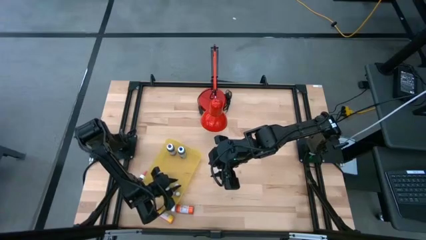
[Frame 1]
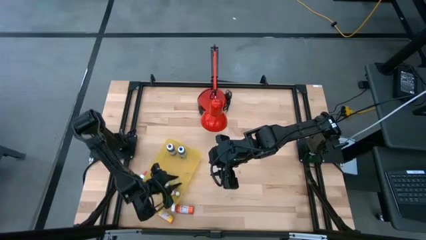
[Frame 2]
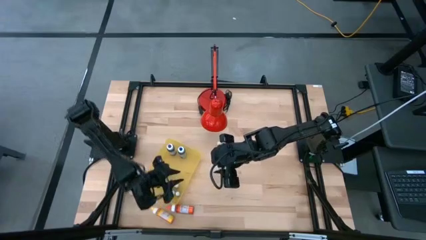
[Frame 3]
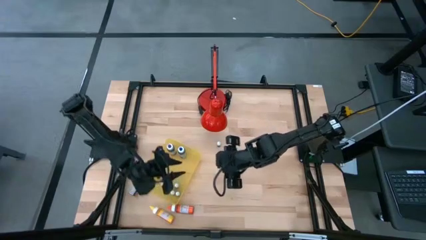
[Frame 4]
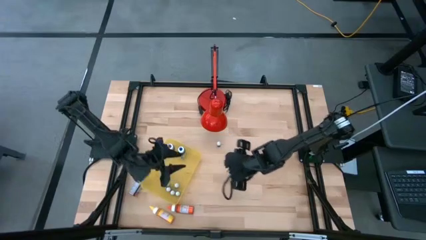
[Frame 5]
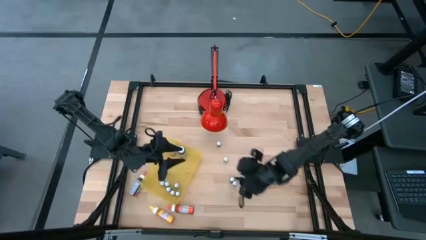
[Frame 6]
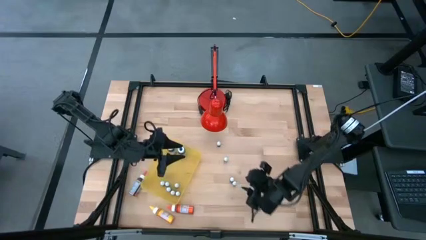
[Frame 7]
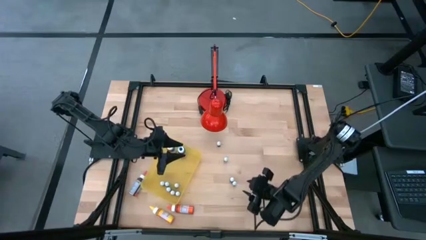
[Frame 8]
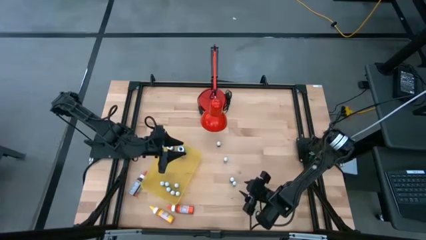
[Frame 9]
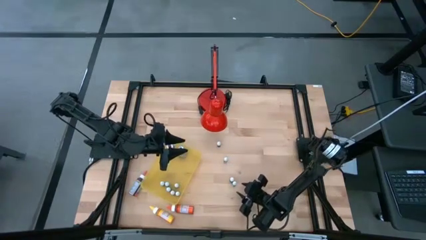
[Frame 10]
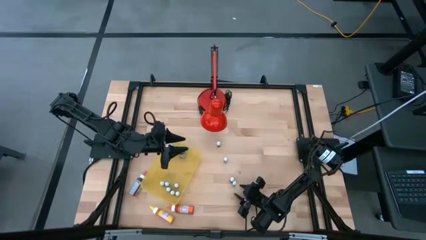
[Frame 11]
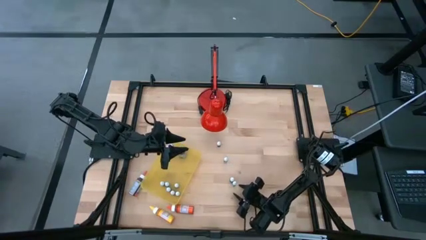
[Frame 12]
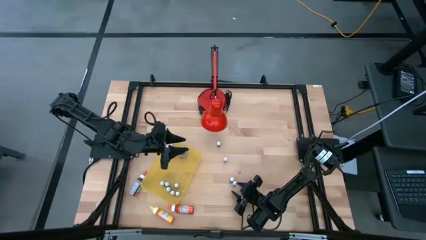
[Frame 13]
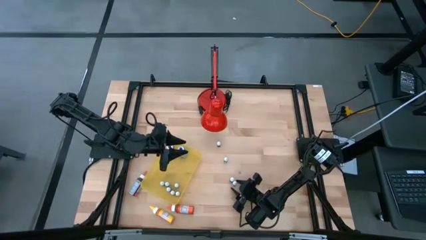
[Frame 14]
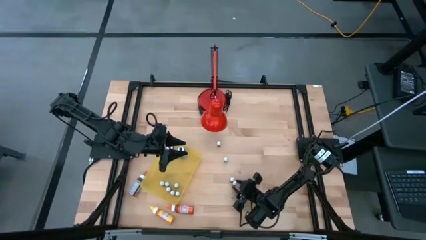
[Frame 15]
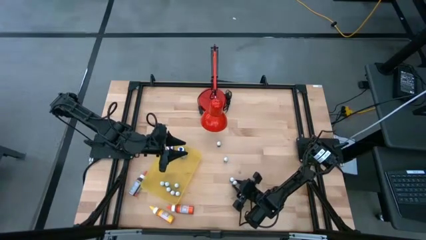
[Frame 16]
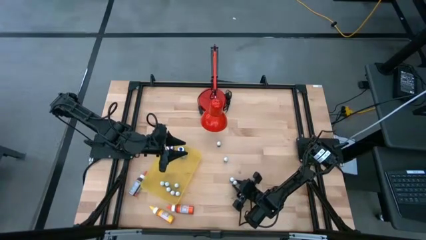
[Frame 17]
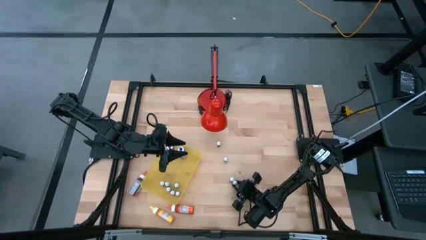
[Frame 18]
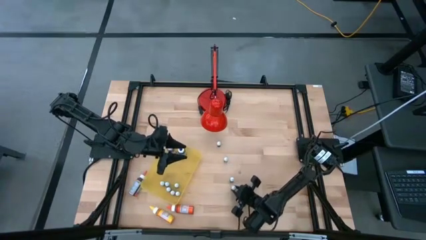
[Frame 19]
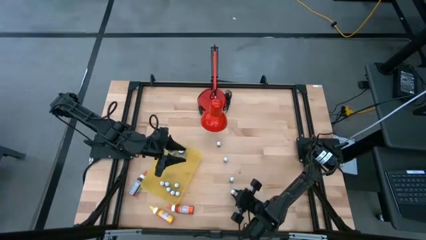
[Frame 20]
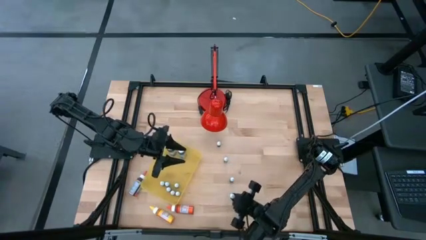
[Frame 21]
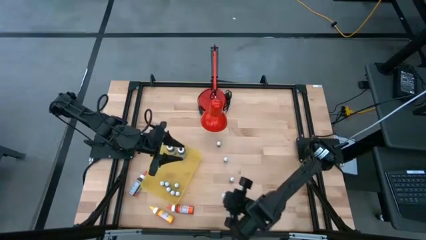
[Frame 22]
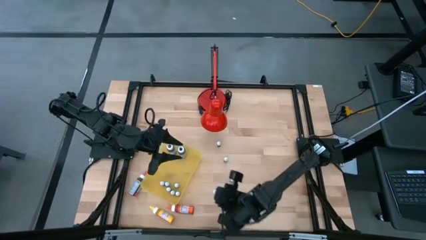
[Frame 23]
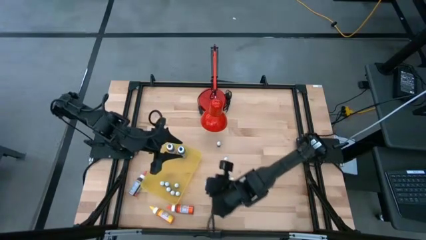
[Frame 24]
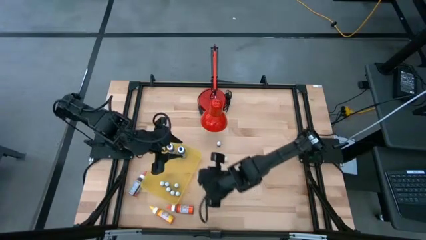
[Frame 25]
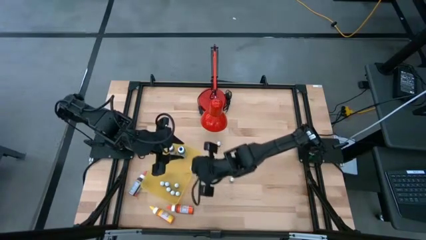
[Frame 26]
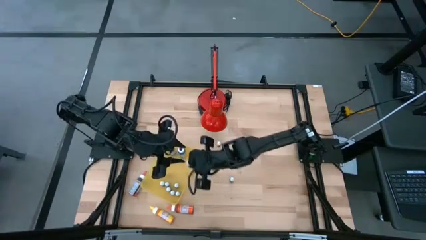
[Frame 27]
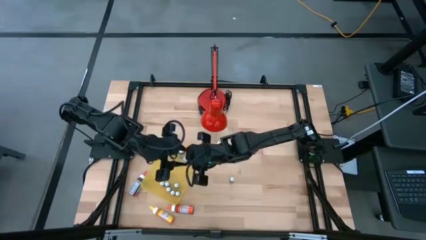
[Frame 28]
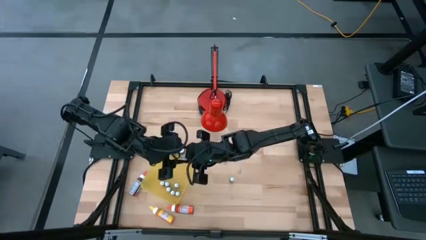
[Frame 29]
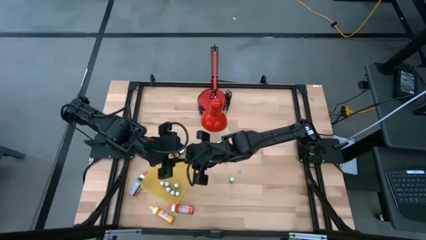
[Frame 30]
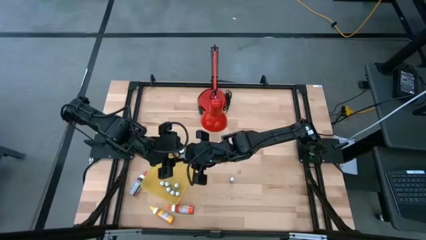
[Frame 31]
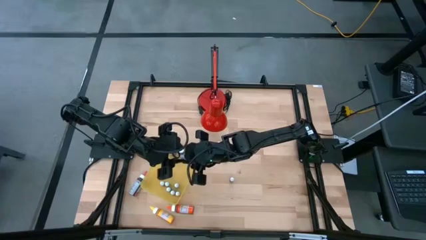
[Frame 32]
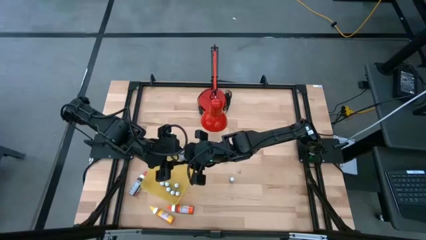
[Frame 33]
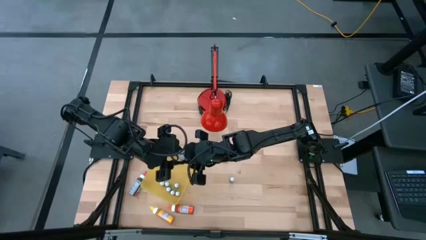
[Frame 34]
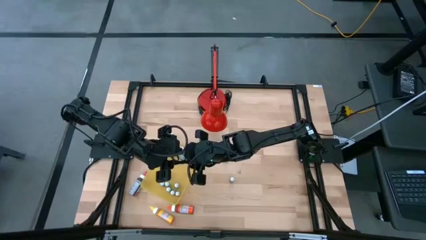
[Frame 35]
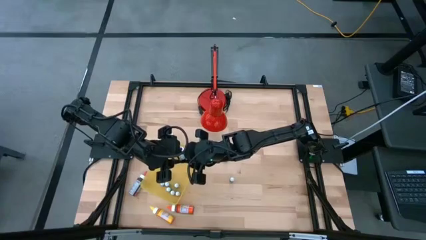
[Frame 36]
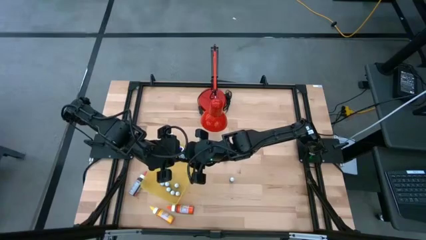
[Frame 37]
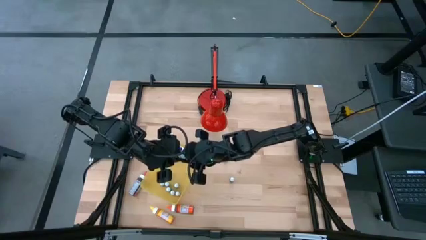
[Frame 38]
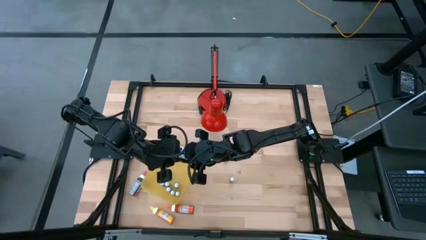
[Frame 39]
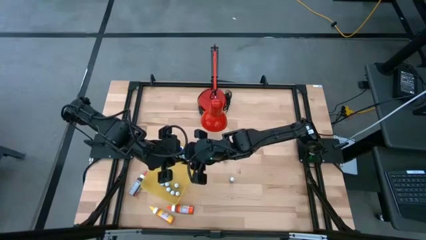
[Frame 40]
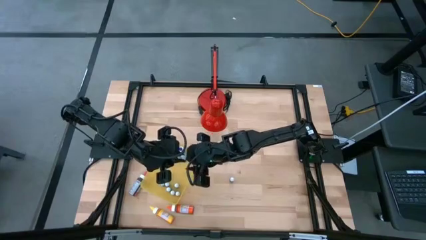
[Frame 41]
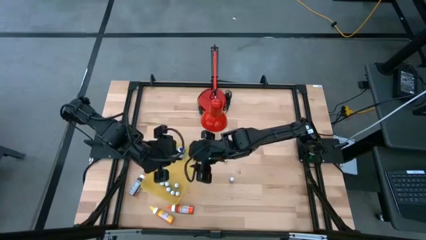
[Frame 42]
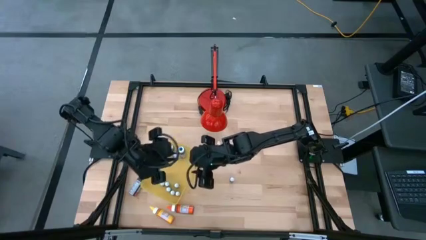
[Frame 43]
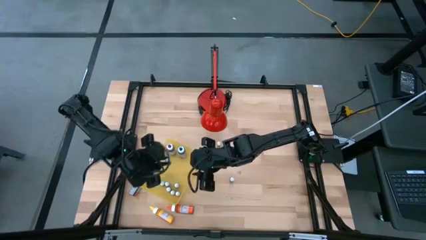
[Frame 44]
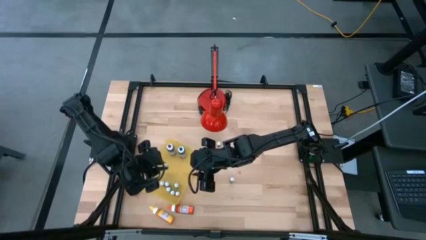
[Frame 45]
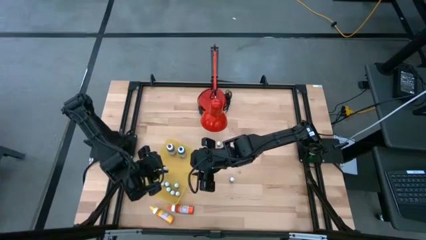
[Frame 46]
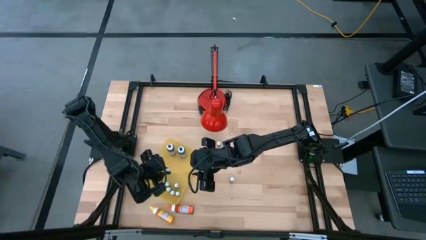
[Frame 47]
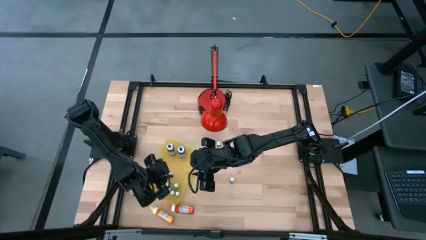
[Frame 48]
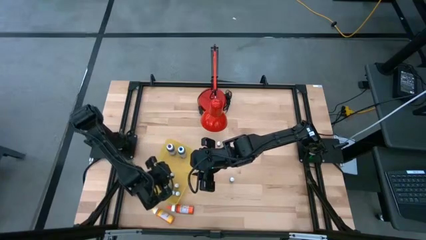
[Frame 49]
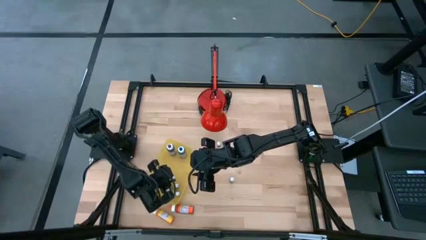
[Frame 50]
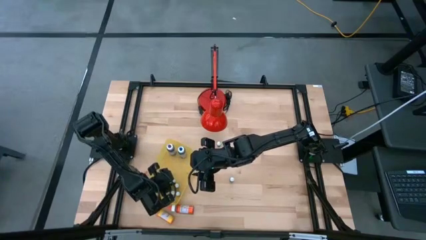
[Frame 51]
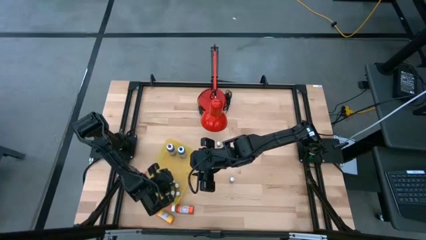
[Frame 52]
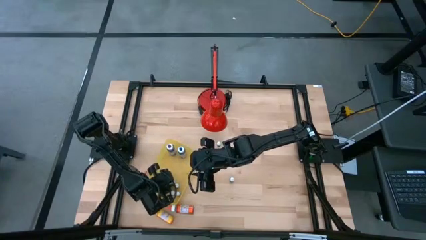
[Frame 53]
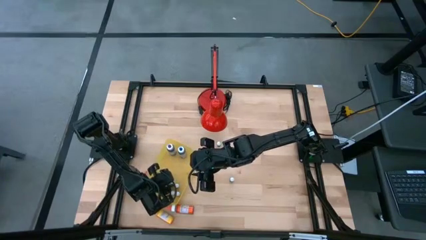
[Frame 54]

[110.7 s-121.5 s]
Task: Pick & Place food coloring
Put the small blue food coloring bottle into the yellow bin

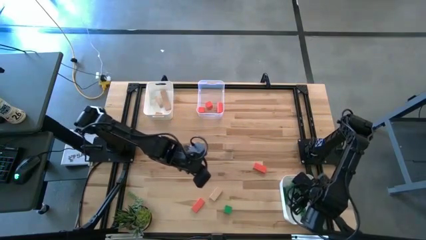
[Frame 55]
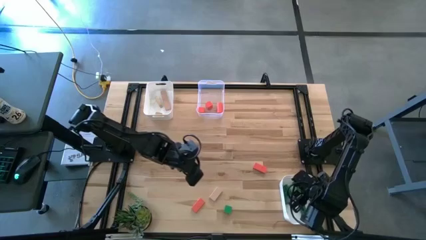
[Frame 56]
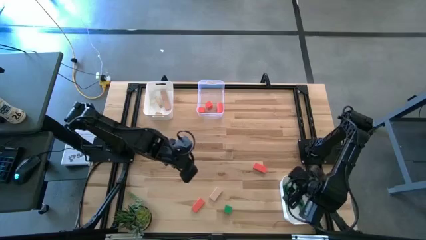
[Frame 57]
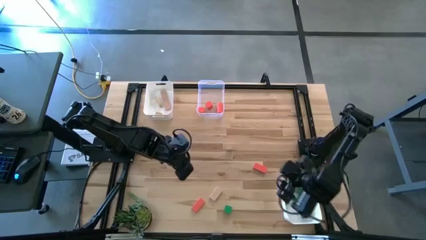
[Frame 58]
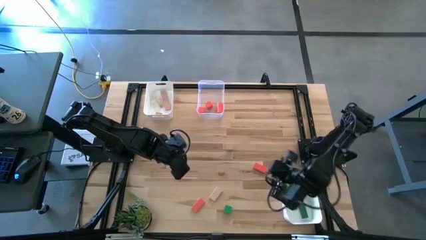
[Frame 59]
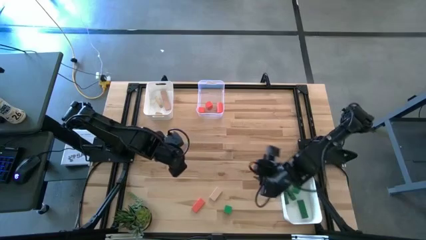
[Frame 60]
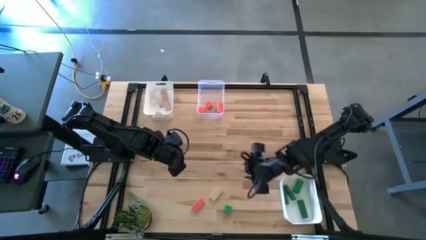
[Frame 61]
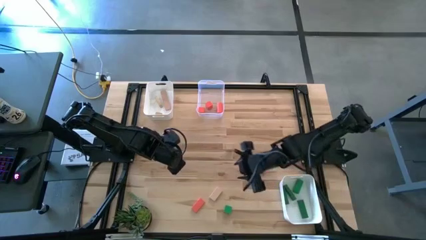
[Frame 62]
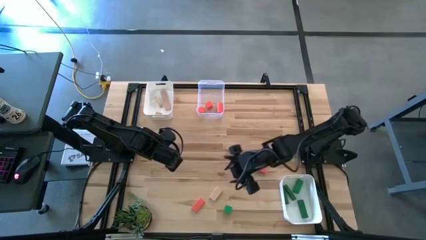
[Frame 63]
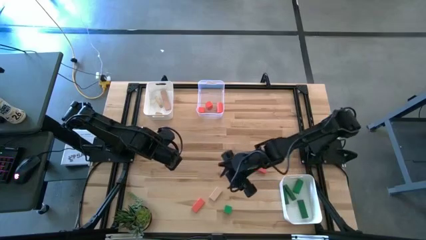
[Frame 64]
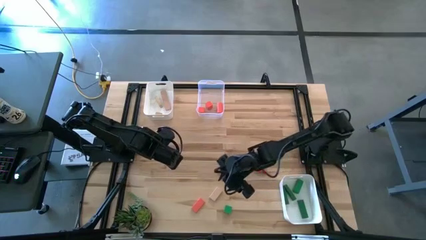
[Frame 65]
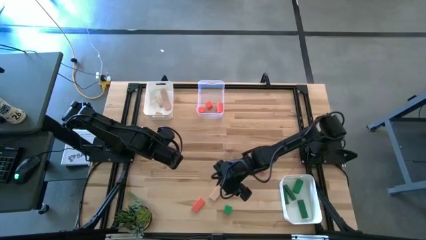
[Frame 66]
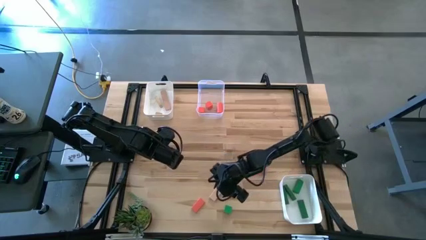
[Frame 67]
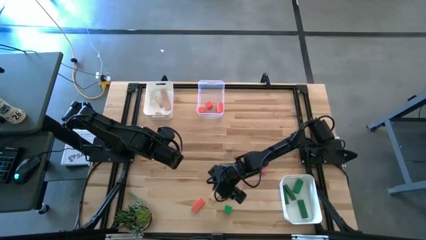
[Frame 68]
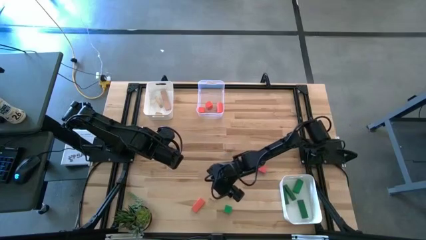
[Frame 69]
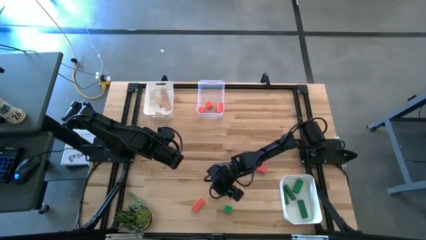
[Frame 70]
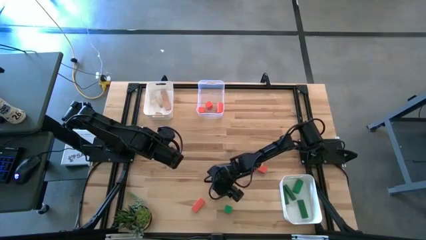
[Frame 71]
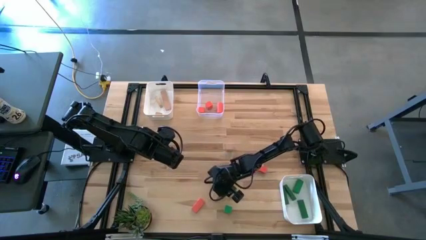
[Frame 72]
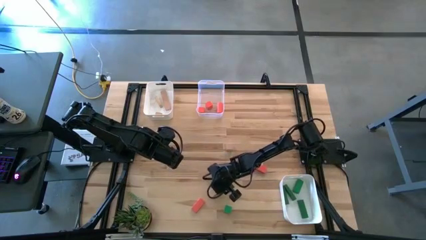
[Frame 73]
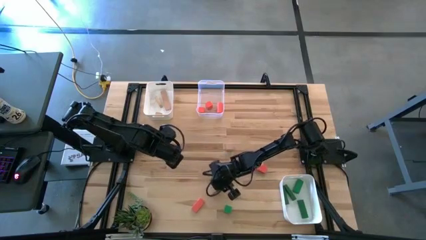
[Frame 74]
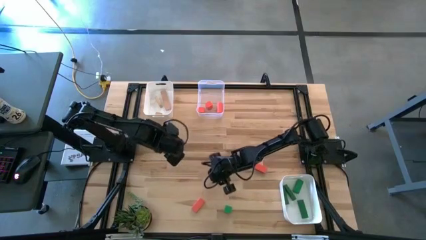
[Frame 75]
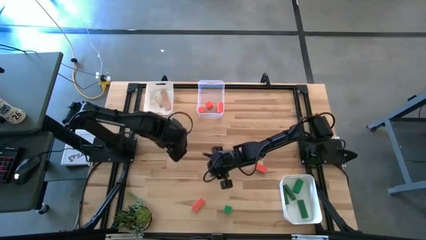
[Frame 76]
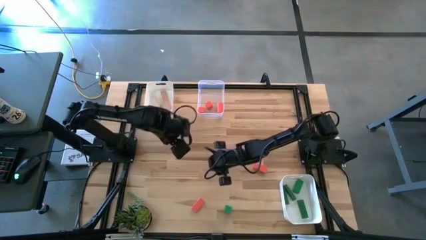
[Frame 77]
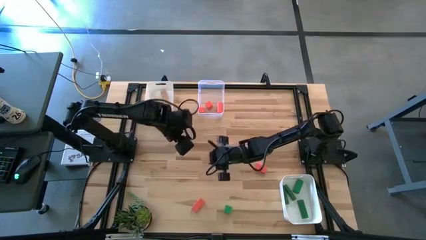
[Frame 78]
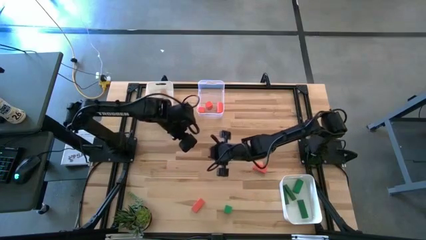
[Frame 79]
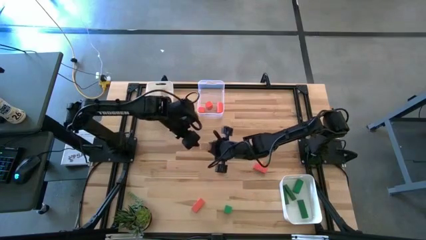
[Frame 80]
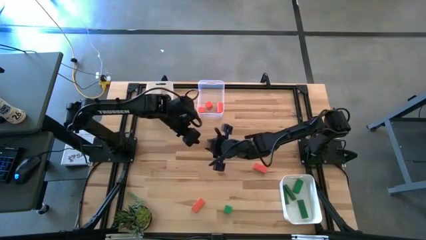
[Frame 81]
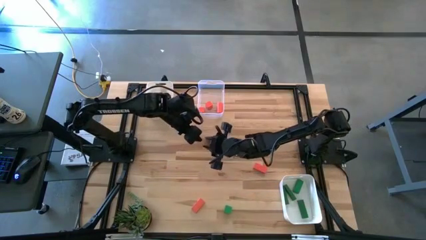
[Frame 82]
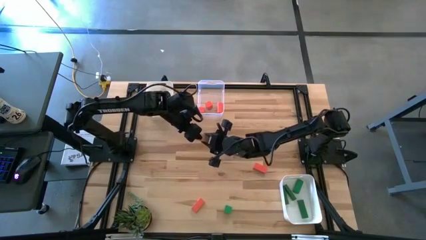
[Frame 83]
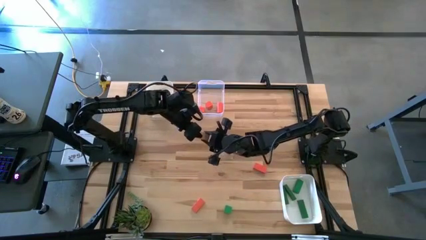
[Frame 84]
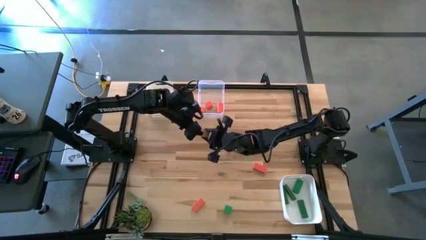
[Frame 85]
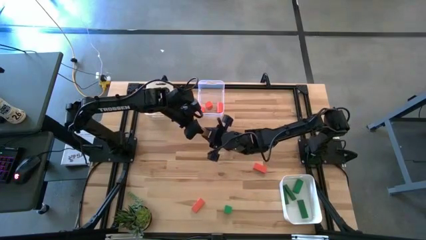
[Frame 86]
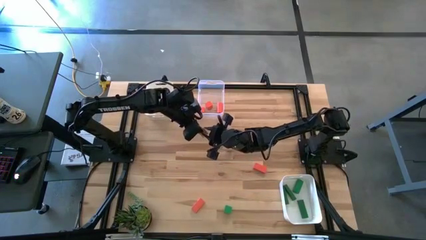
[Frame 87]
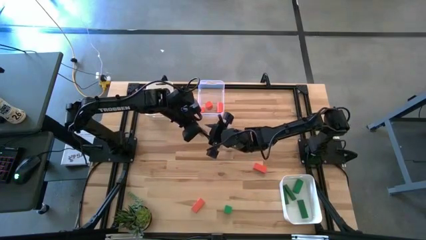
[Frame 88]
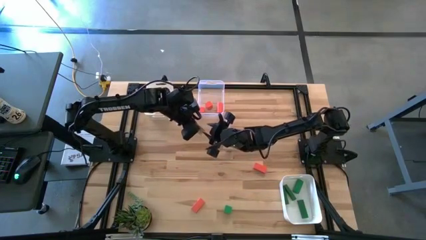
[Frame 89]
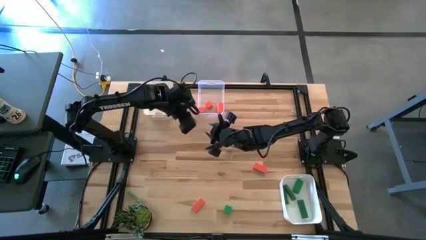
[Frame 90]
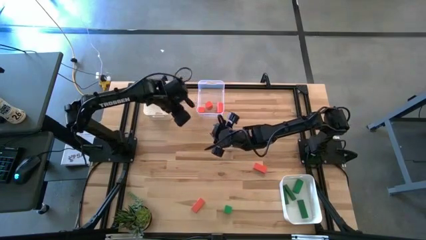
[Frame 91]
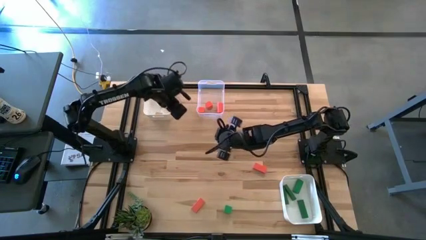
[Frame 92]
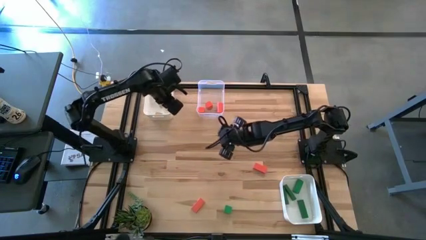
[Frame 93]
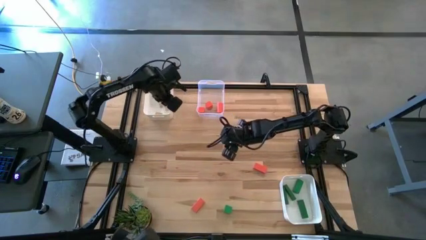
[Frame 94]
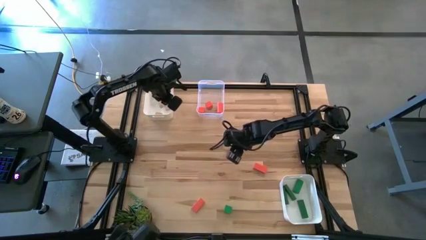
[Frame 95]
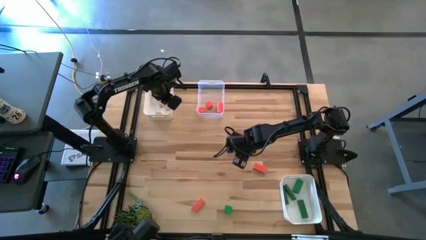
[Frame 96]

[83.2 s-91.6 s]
Task: Sort & place blocks by color
Put the brown block into the top white bin
